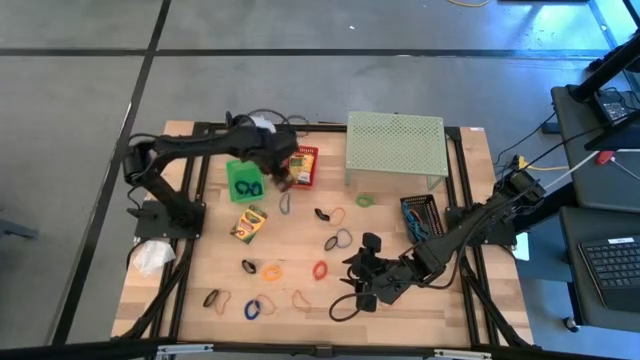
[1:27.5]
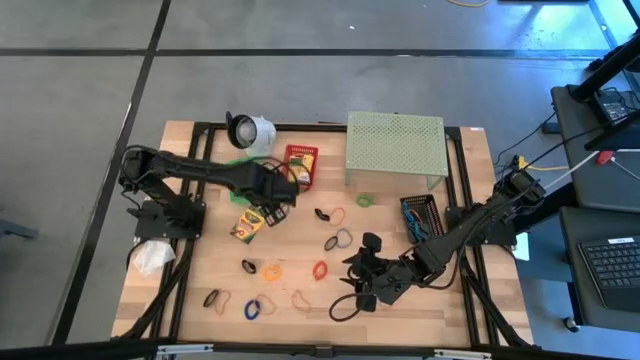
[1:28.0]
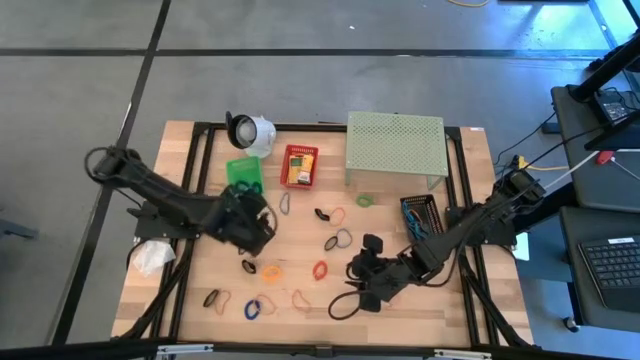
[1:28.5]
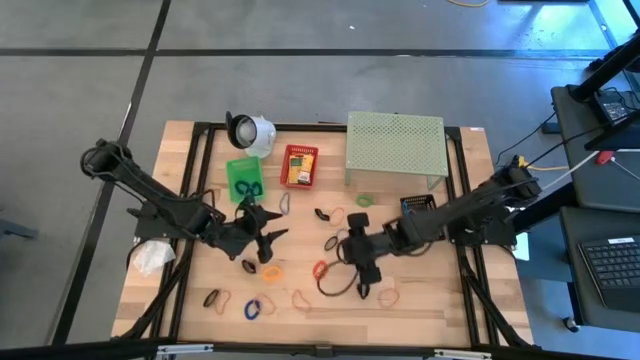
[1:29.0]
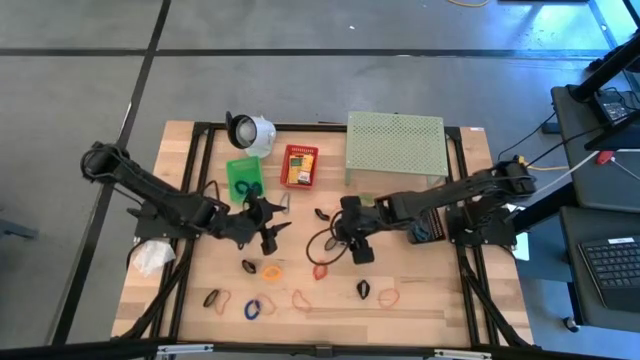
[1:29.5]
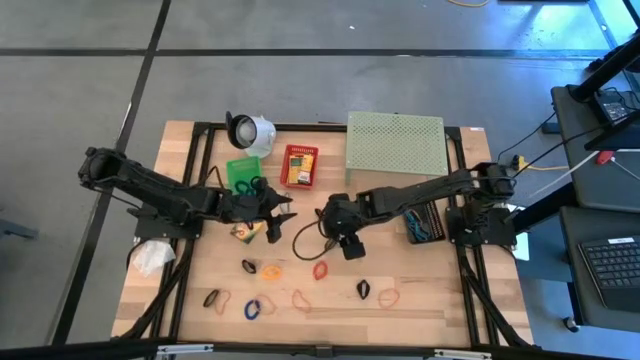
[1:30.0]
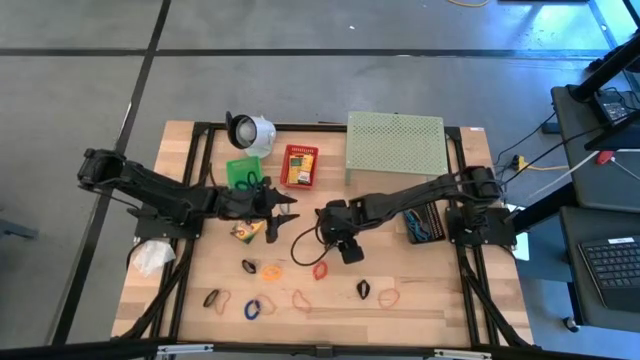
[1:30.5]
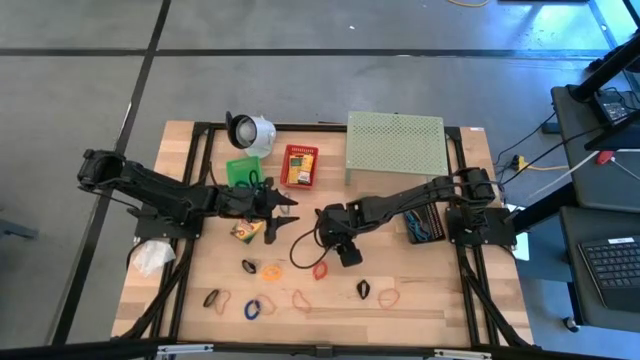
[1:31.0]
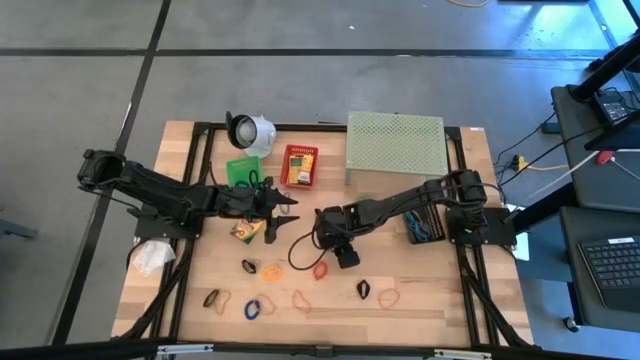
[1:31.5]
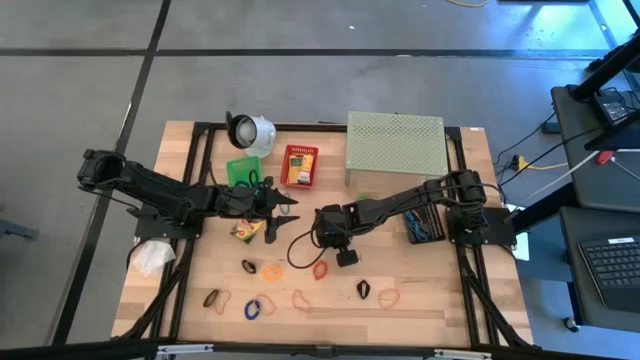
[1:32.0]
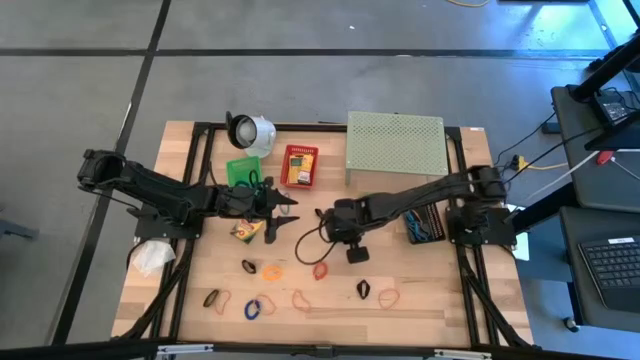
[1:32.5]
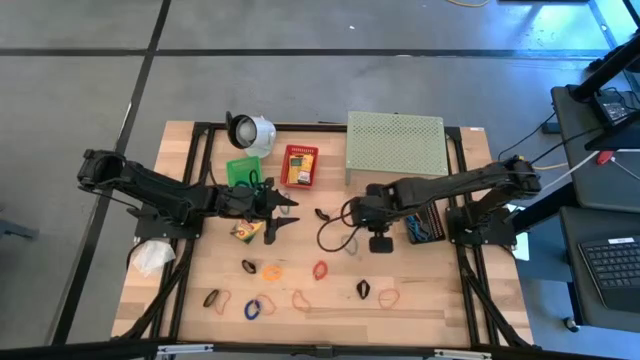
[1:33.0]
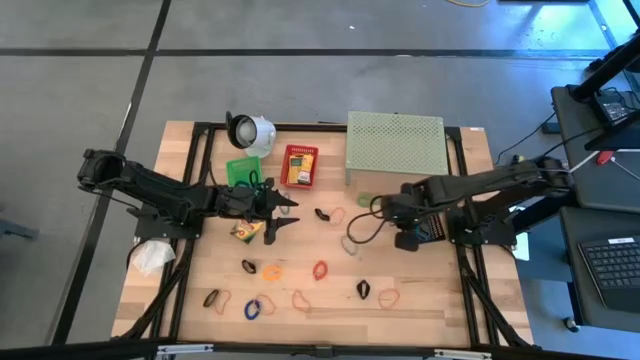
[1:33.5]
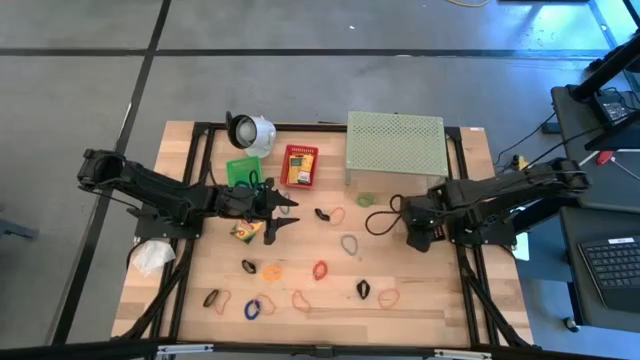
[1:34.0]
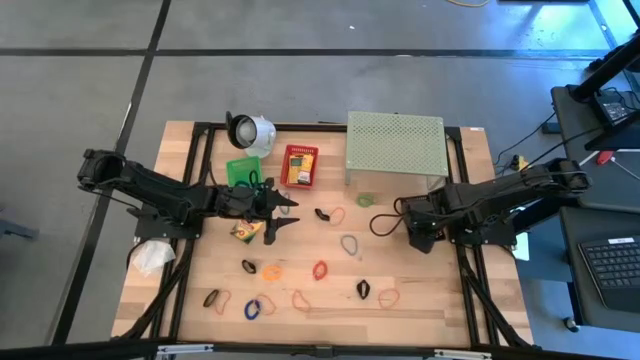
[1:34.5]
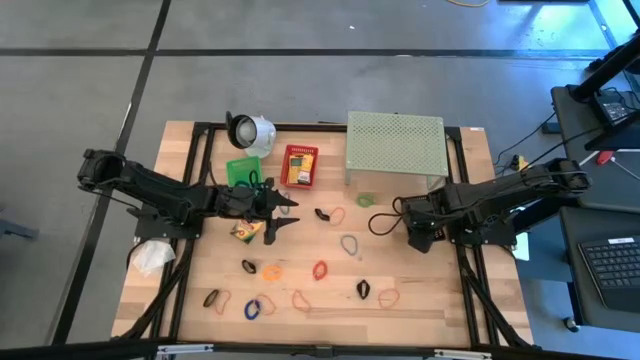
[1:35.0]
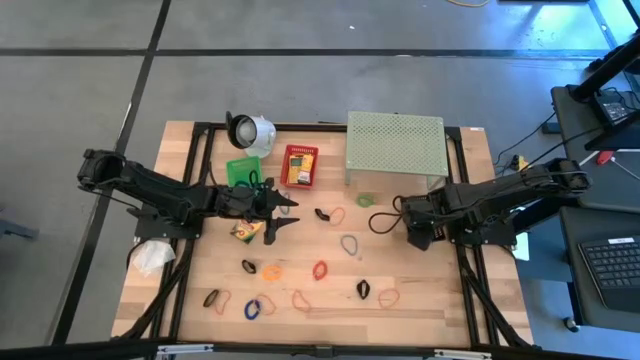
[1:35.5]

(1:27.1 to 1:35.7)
Task: Pick & Place Office Desk Supplies
Put the black rubber band into the black basket

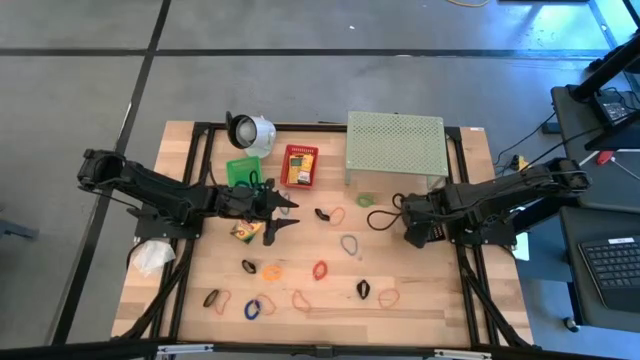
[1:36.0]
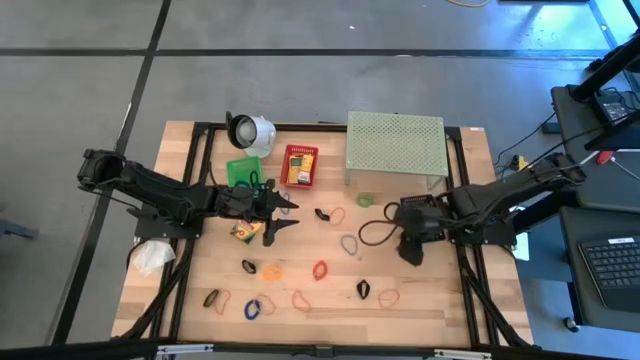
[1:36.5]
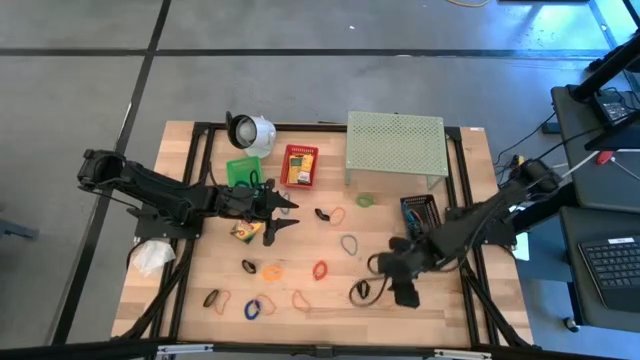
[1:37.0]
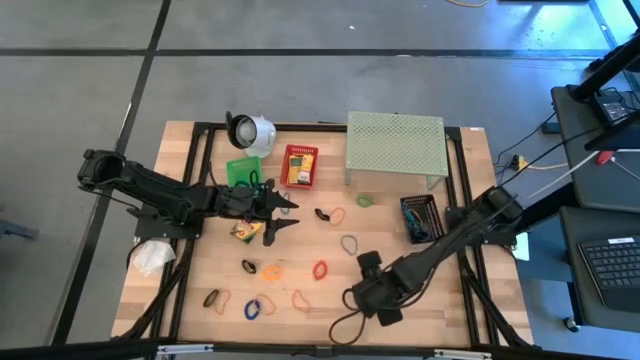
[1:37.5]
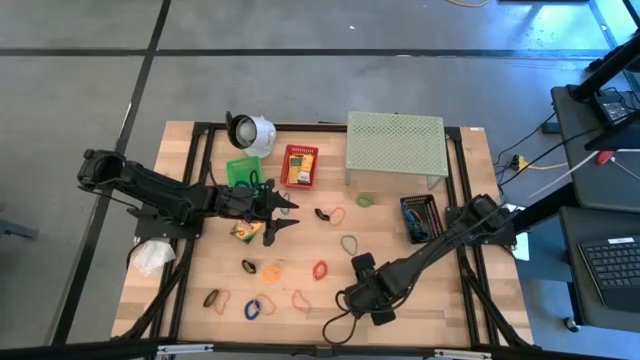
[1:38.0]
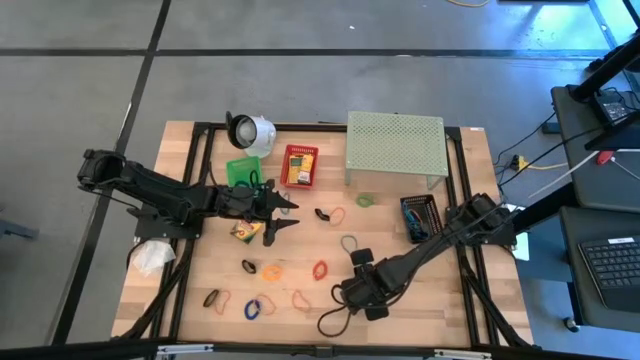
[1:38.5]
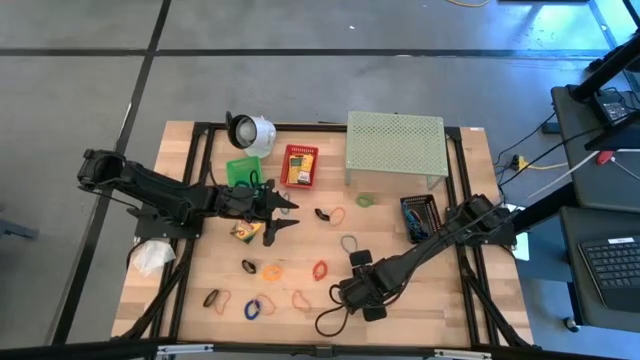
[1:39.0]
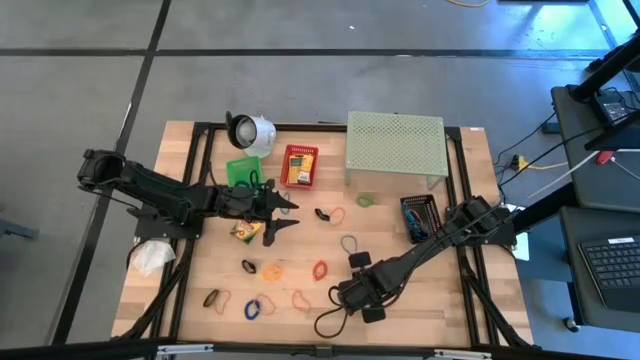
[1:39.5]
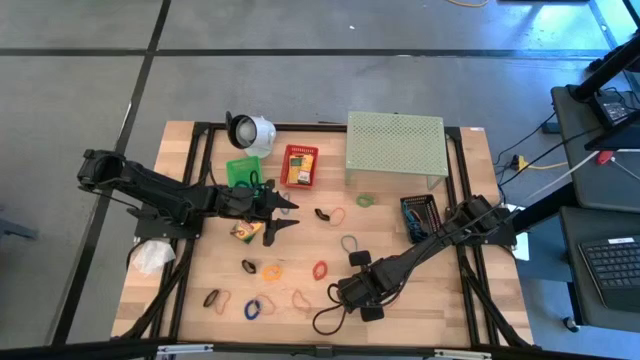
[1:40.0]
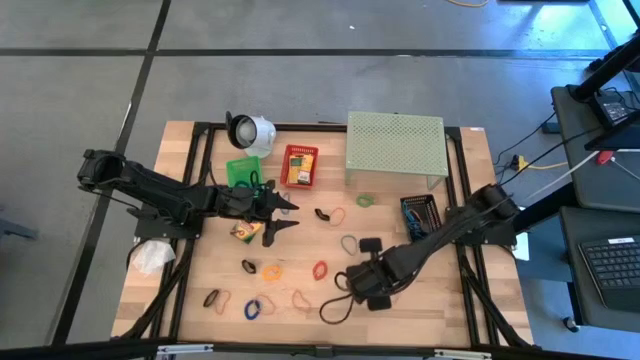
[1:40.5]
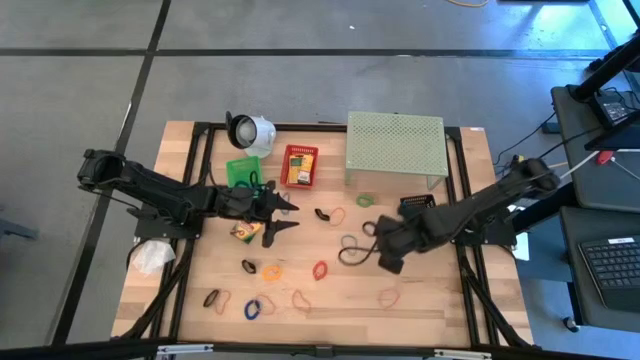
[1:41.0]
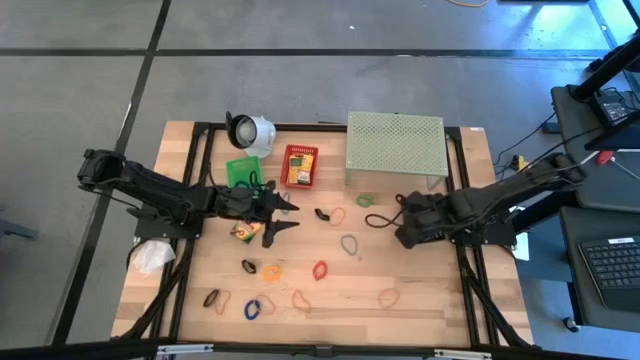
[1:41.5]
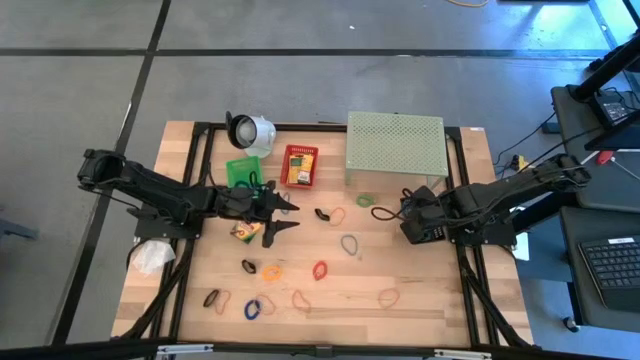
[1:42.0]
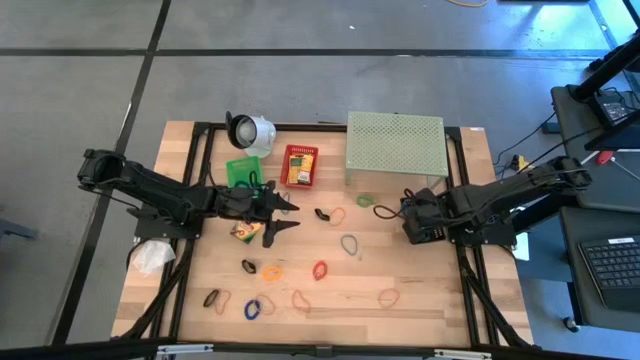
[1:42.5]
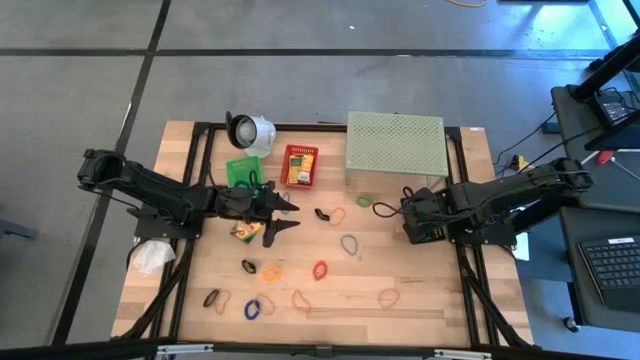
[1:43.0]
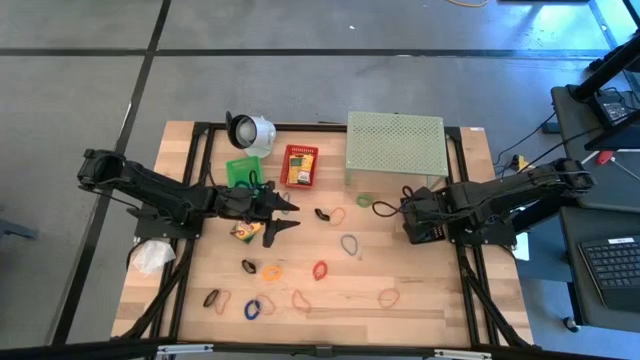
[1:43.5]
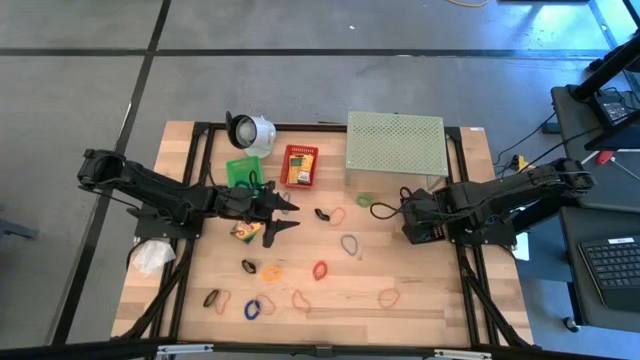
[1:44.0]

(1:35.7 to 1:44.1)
Put the black rubber band into the black basket

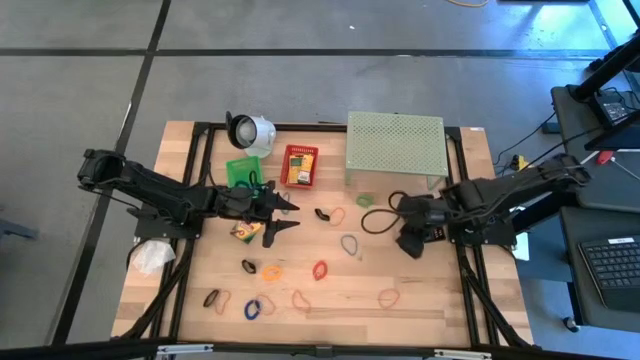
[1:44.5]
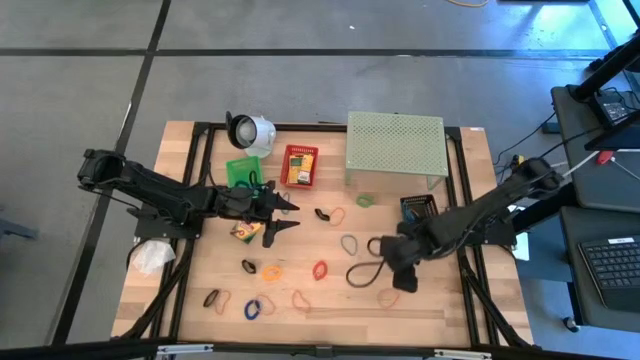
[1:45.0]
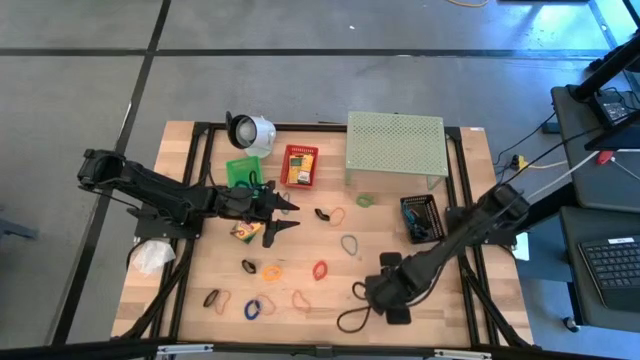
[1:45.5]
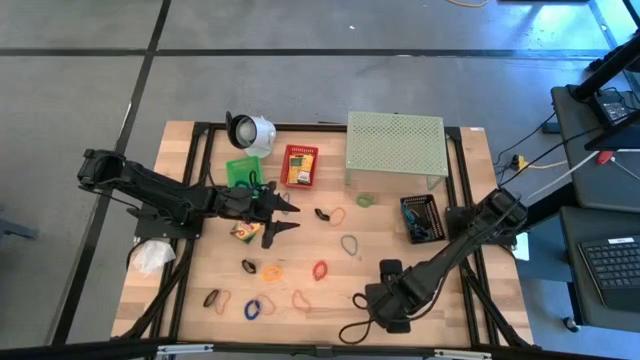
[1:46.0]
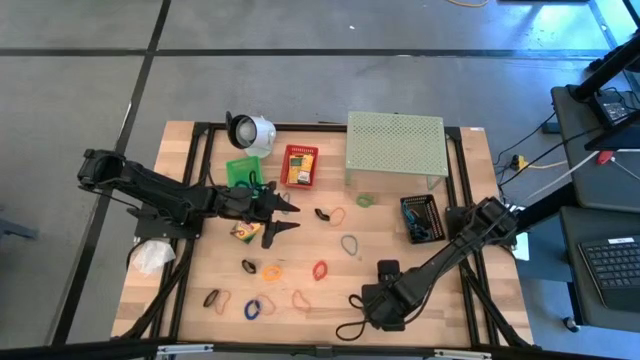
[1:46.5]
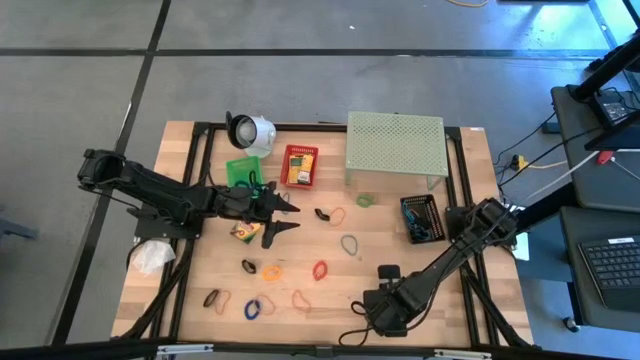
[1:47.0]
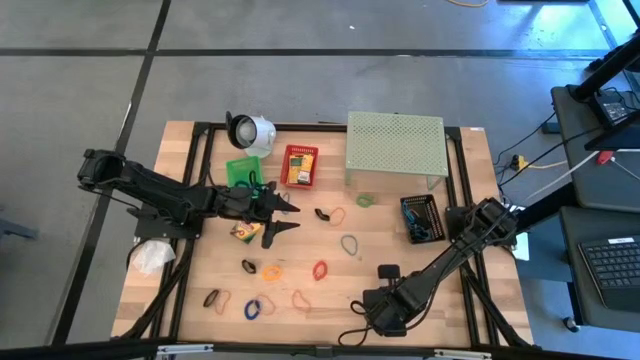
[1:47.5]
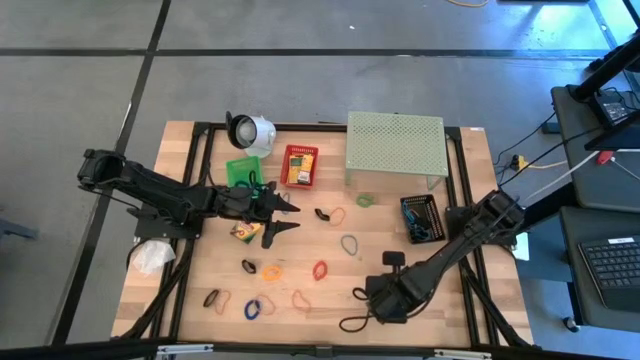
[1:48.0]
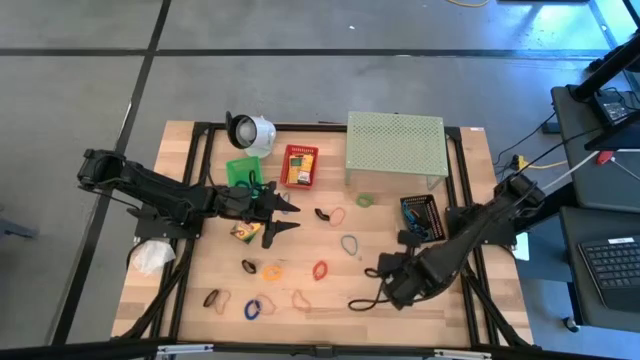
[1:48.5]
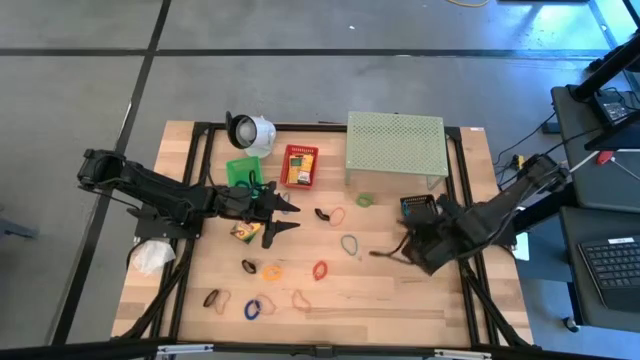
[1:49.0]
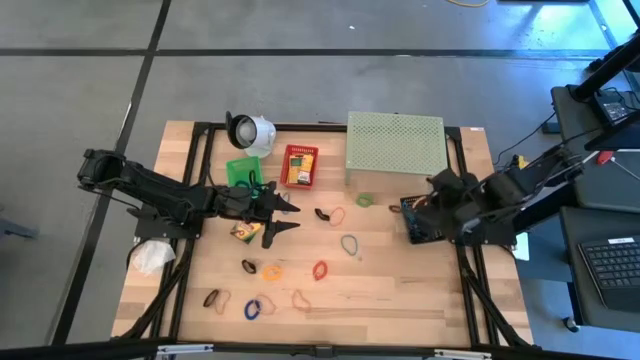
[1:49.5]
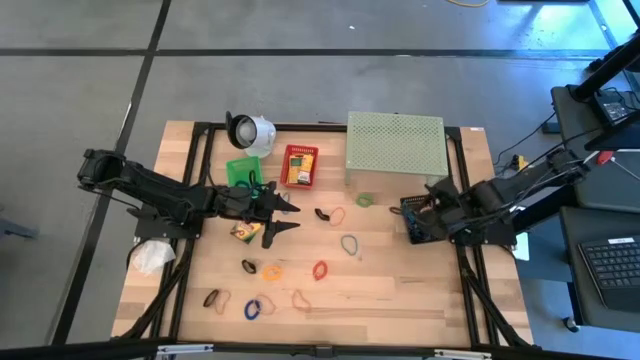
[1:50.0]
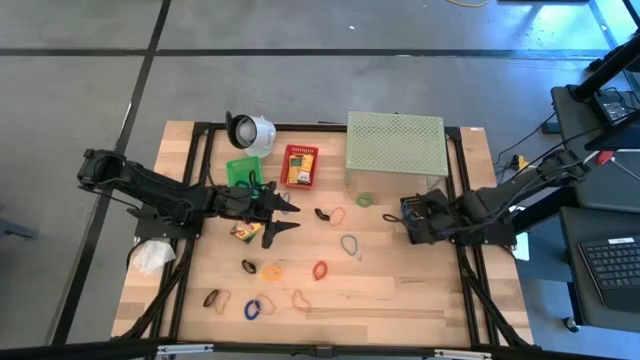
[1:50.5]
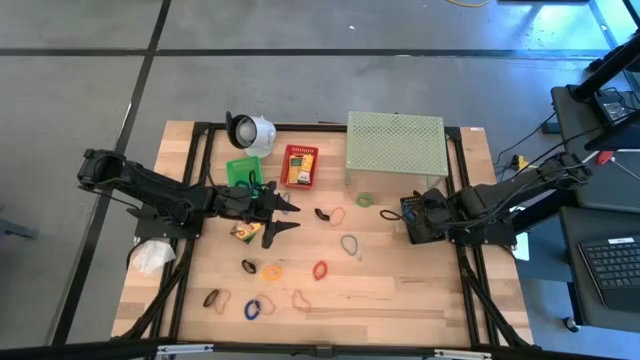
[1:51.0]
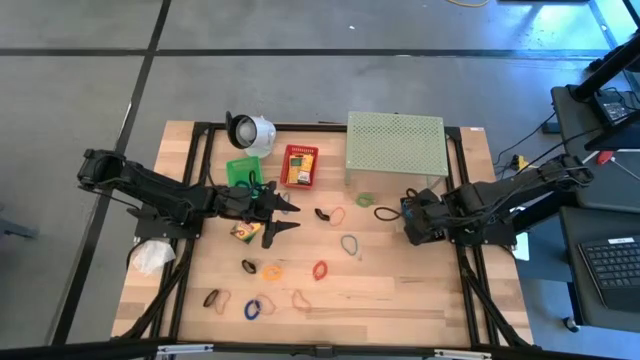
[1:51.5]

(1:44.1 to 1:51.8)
Put the orange rubber band into the black basket
